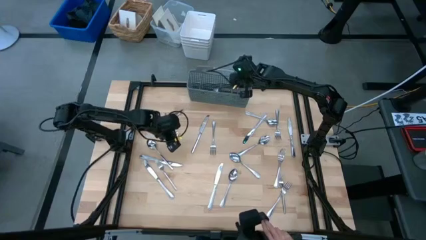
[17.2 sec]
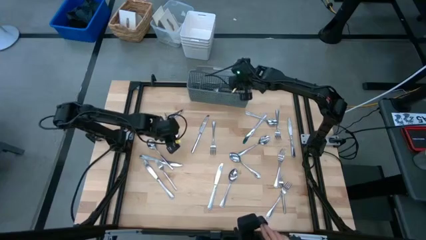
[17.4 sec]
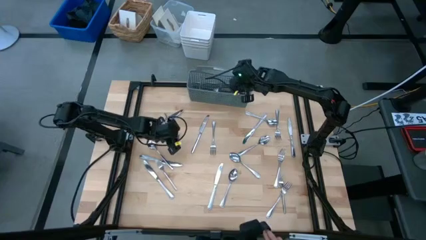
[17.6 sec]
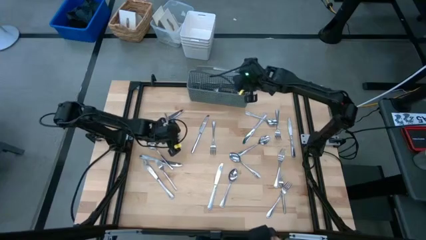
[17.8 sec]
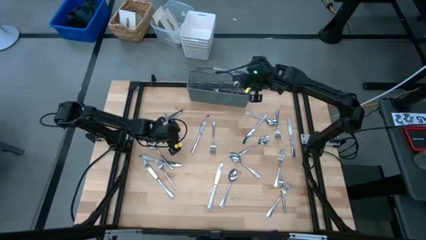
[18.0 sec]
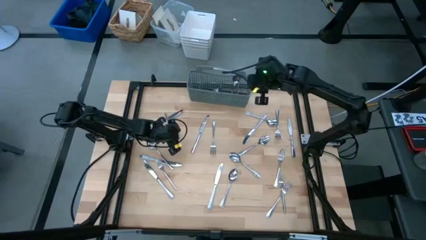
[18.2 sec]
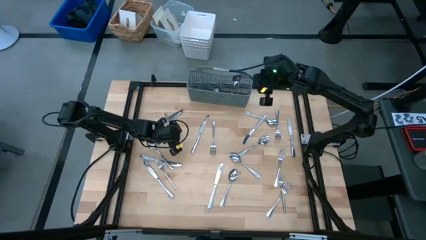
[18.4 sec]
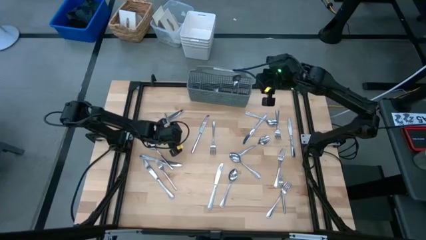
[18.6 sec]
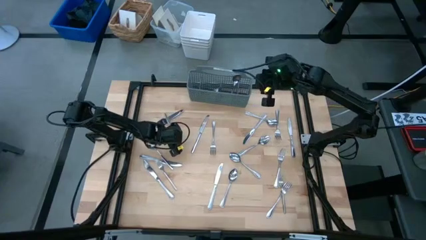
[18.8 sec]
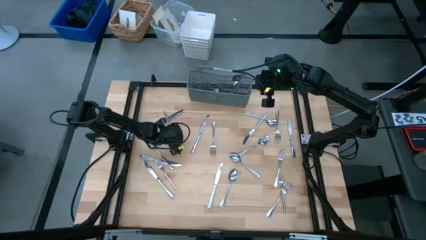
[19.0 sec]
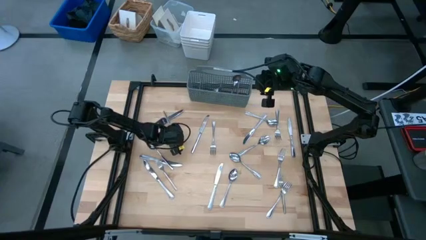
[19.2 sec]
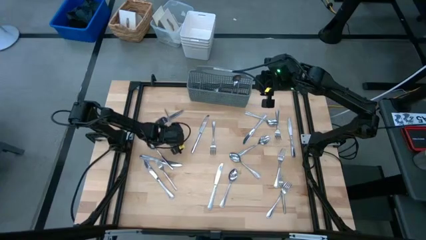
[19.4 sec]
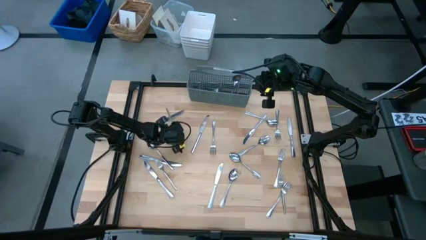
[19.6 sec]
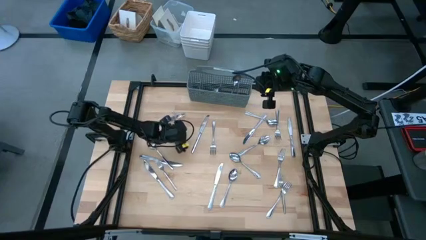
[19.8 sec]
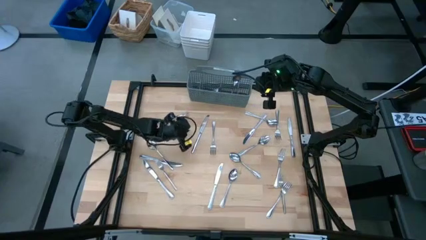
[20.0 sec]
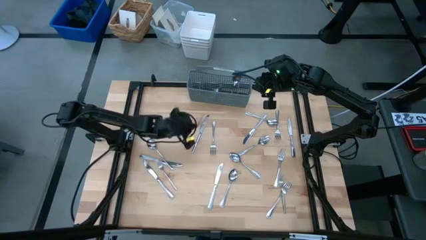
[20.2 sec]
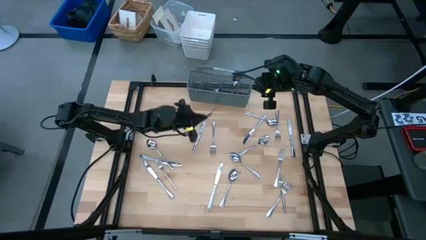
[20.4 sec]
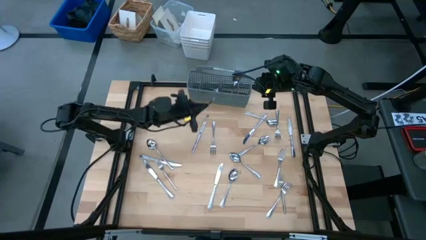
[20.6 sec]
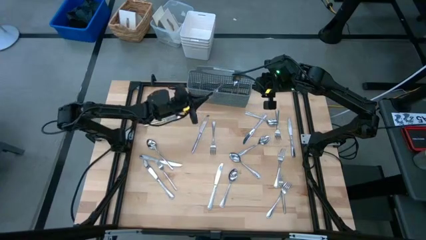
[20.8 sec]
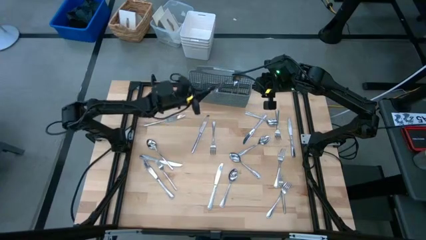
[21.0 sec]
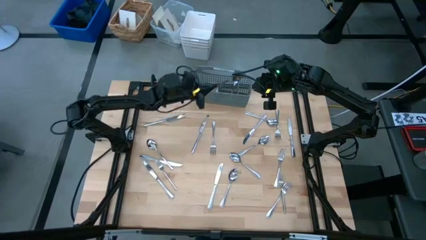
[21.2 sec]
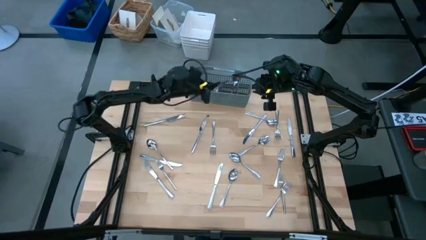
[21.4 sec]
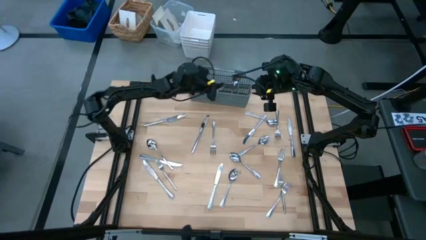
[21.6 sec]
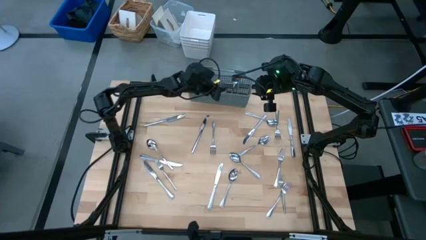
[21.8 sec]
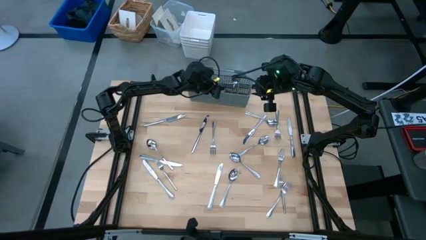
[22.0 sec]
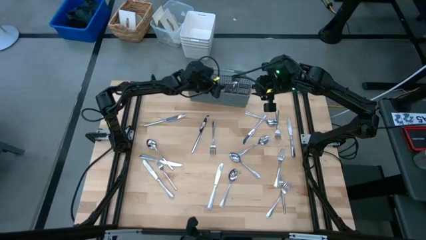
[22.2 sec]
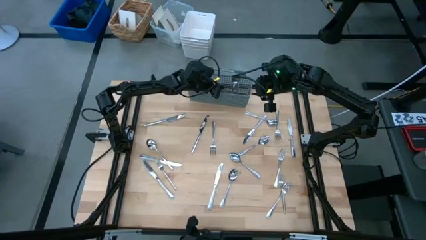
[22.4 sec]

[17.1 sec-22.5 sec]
Task: Sort silverware
Put the spoon into the gray silverware organizer

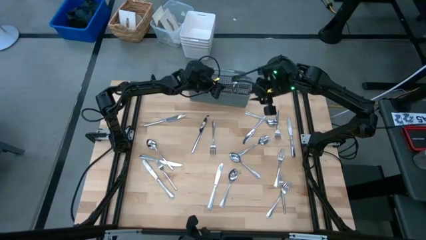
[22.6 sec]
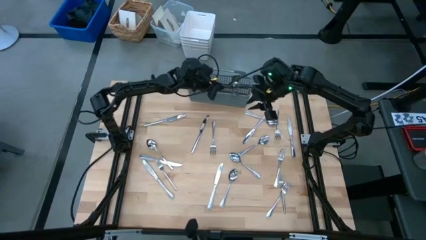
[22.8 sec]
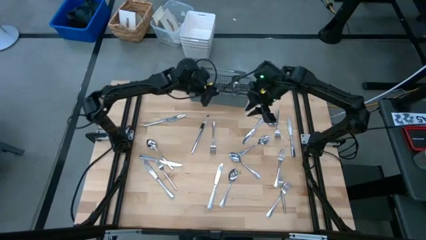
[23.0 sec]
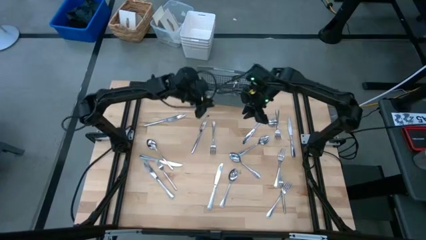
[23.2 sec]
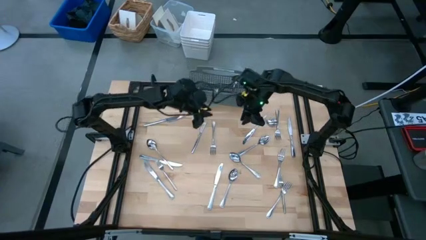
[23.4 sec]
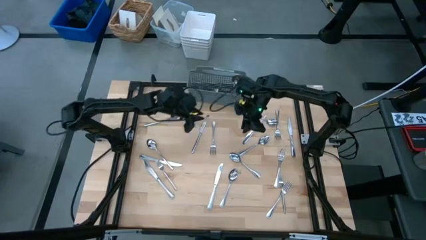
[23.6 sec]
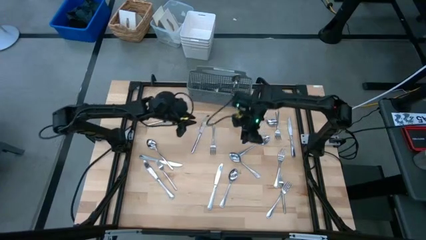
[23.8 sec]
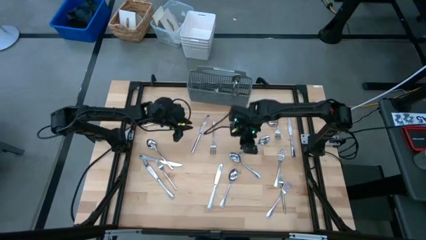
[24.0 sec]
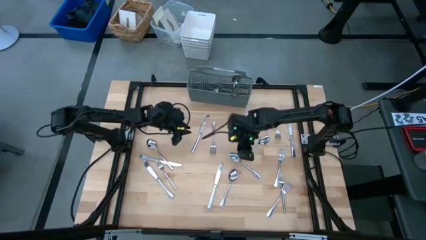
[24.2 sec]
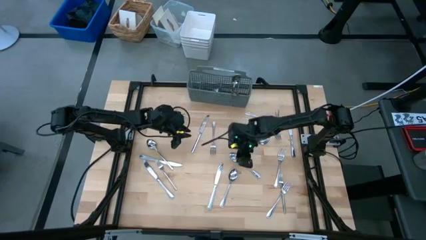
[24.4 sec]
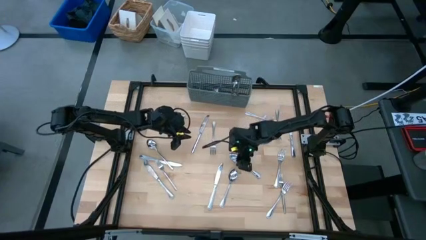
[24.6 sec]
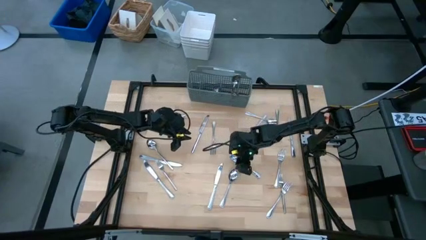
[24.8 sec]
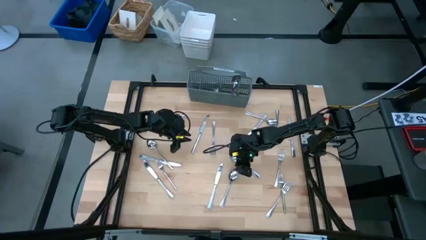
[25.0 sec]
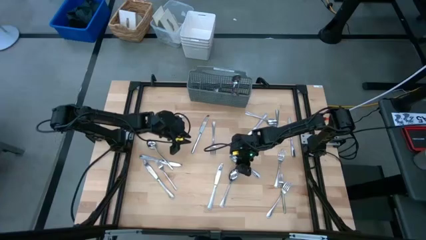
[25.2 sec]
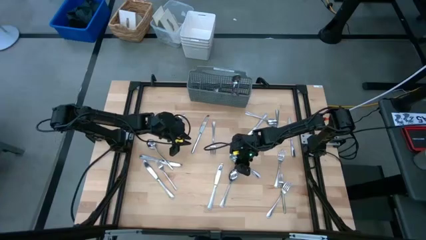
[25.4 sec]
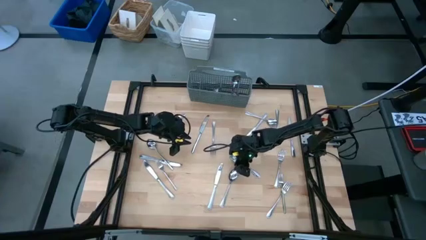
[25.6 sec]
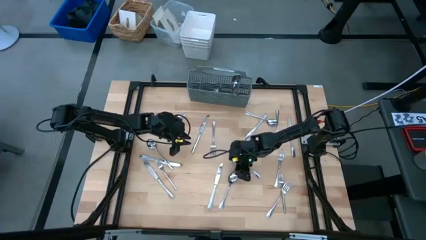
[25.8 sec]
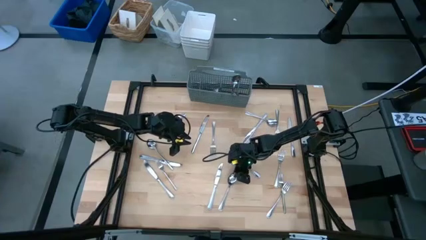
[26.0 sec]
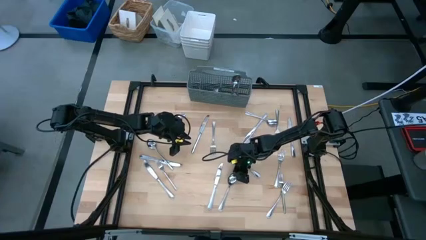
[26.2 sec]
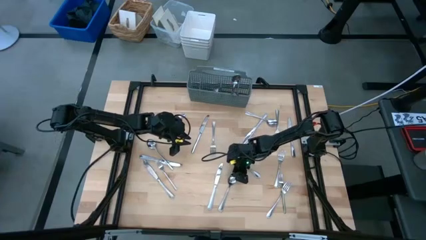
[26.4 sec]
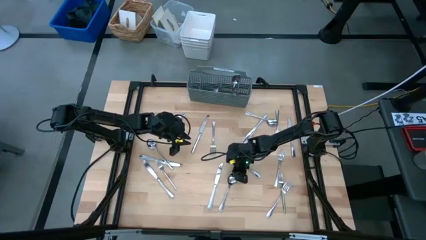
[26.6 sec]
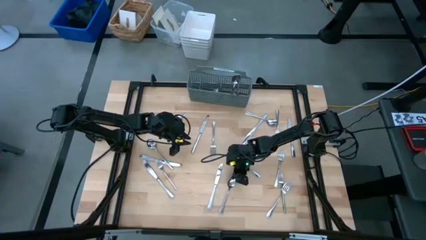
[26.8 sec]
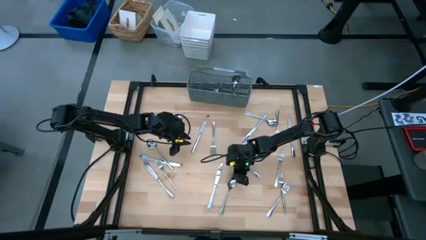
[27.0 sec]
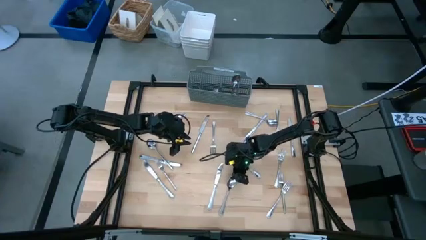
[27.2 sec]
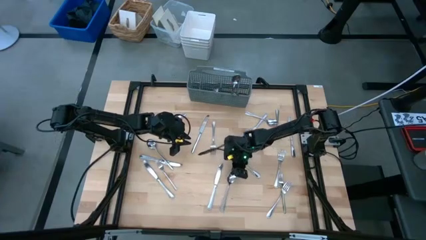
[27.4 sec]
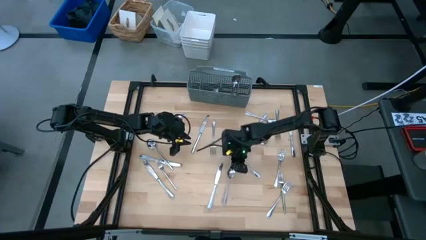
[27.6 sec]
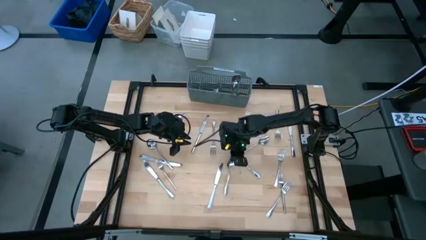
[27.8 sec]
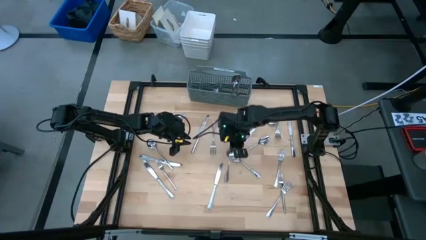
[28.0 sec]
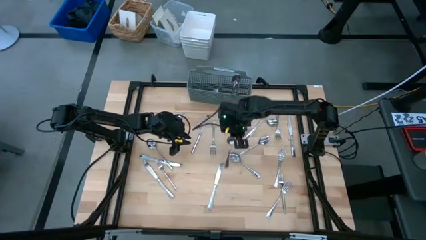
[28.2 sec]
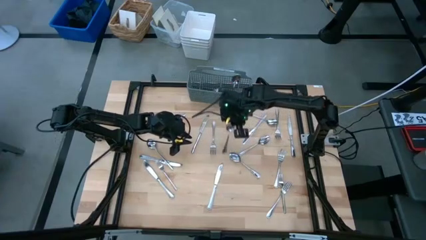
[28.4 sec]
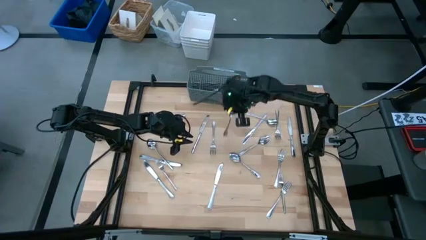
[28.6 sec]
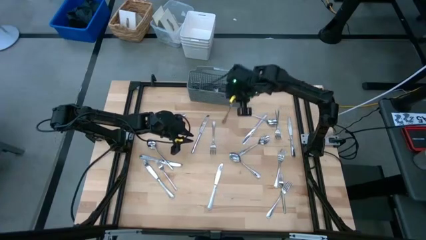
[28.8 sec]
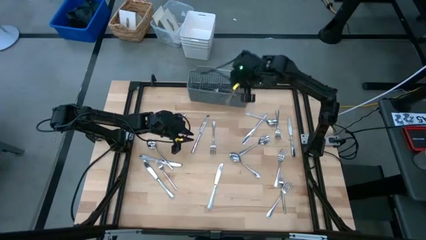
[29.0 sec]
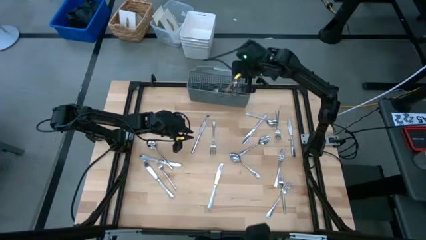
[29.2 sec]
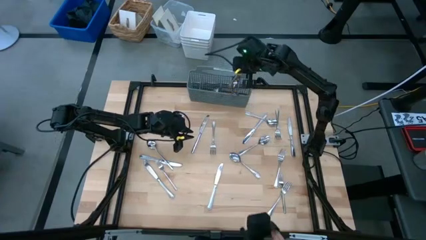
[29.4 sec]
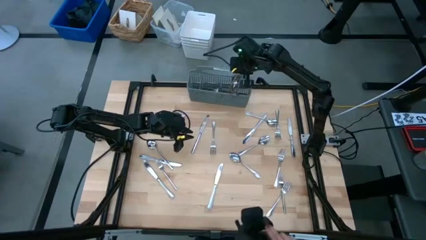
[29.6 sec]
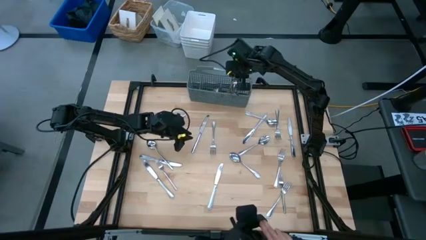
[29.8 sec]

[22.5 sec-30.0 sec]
Put the spoon into the gray silverware organizer

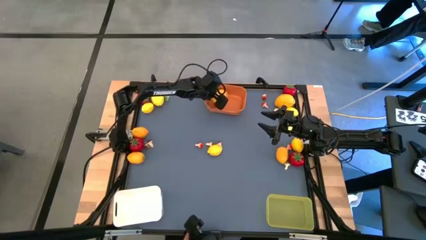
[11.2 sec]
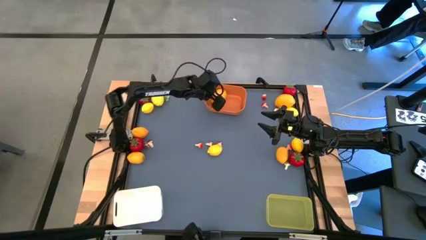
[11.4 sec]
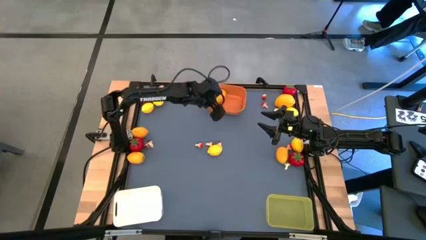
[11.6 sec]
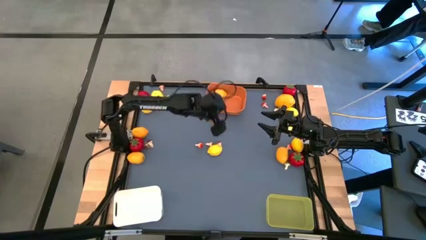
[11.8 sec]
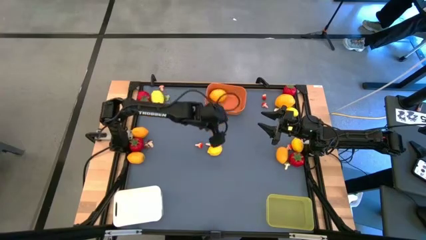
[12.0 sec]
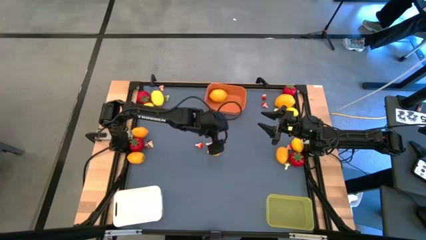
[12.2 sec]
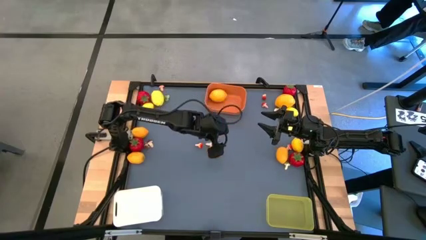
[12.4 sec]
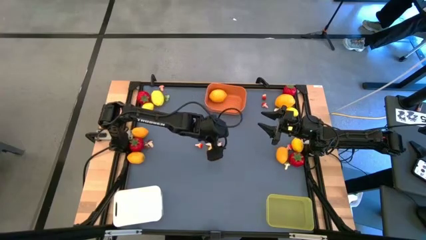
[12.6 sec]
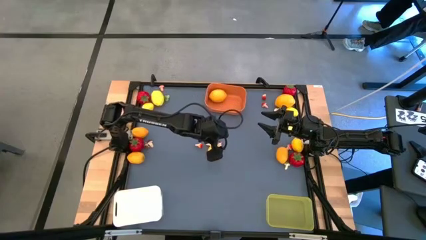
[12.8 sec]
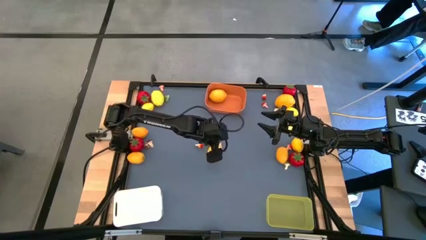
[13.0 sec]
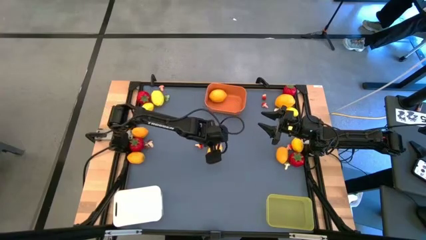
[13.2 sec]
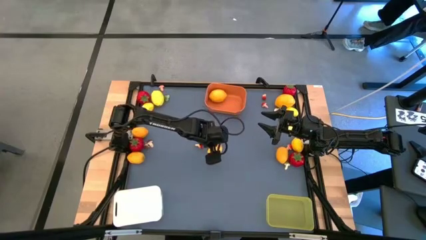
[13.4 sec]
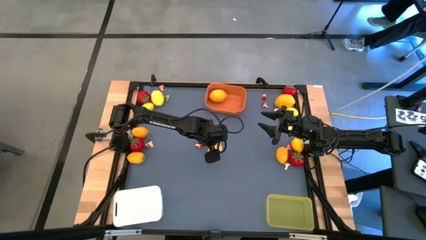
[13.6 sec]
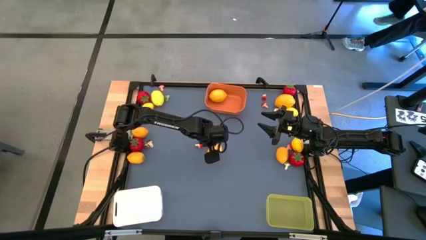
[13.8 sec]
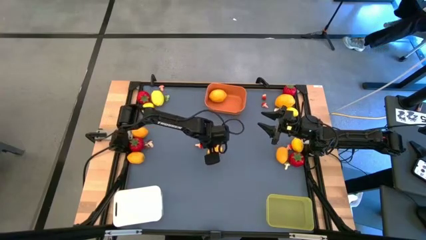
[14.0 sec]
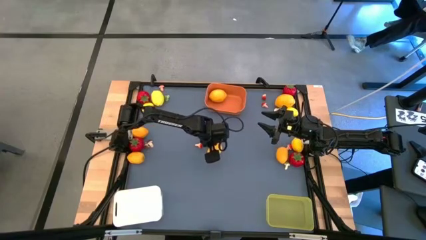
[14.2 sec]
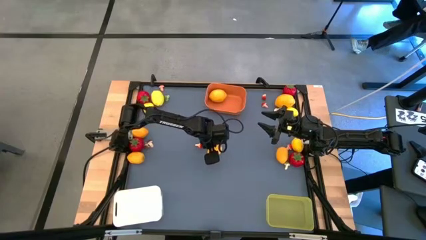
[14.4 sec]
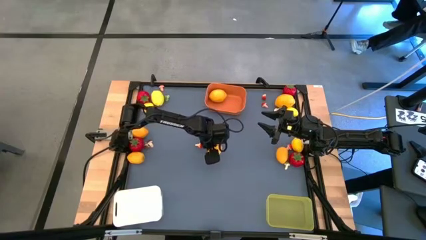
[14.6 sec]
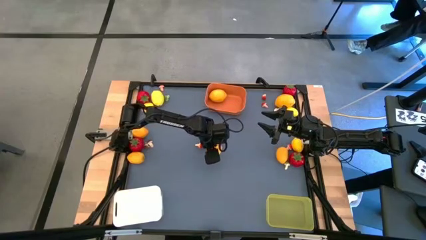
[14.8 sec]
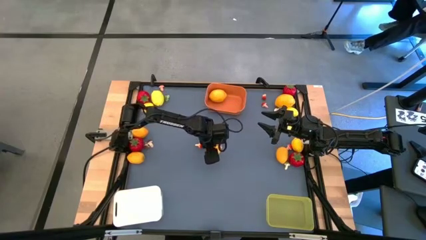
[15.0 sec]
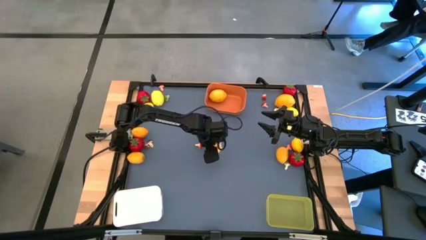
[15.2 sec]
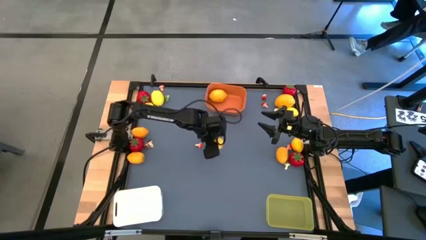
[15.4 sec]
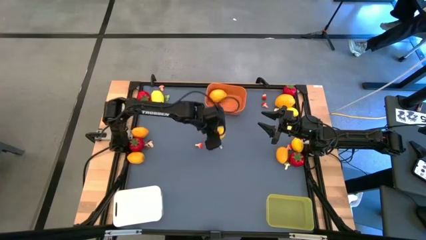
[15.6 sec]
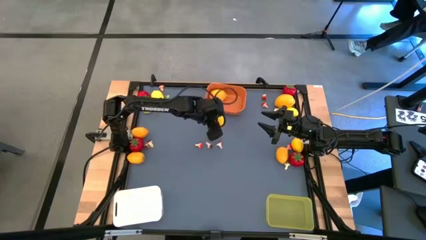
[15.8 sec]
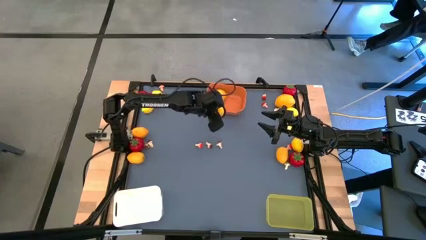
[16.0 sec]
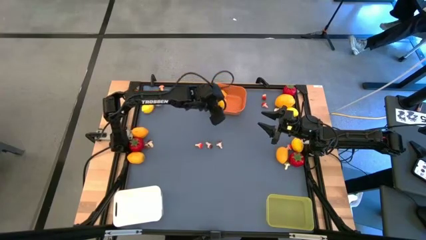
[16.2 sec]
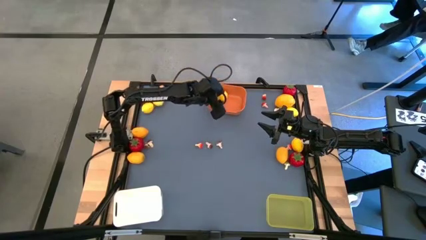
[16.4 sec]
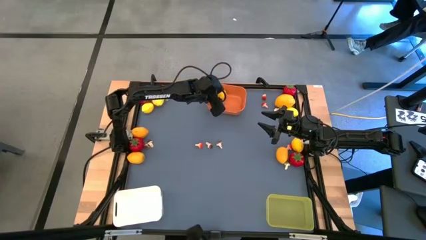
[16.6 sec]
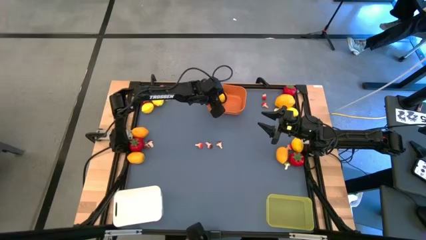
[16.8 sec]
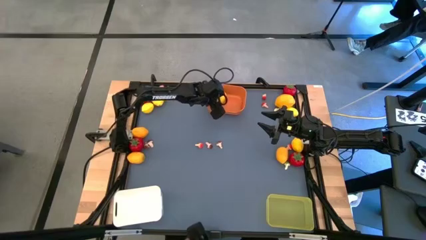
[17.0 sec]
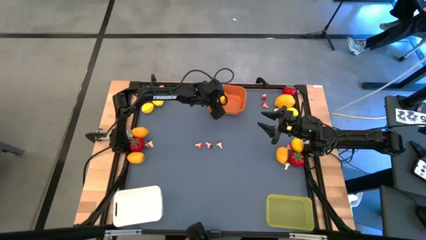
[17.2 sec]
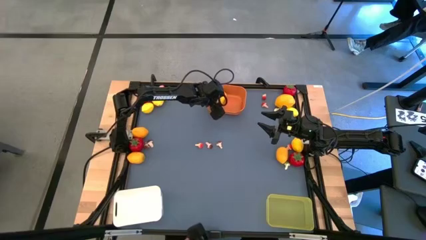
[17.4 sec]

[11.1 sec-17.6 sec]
Task: Sort produce into baskets
Put the yellow lemon into the orange bin
